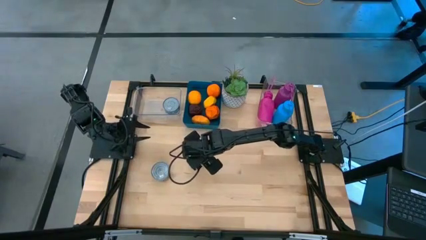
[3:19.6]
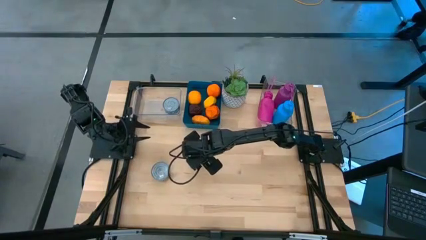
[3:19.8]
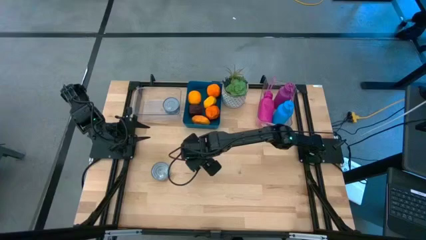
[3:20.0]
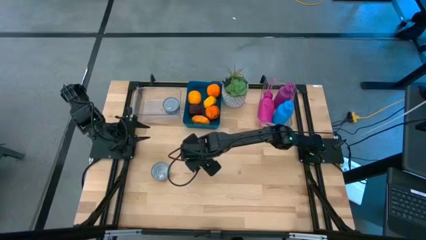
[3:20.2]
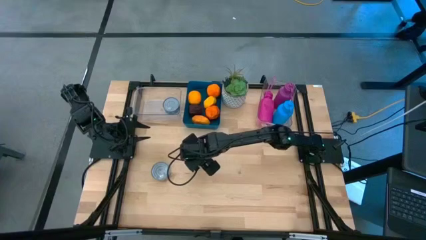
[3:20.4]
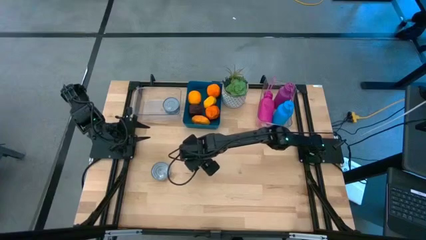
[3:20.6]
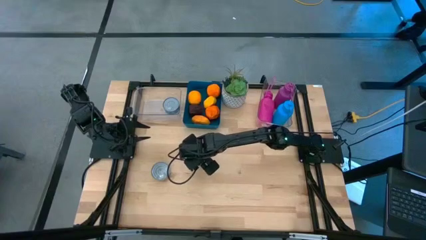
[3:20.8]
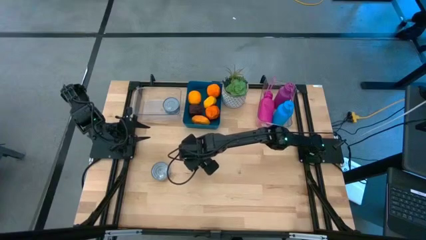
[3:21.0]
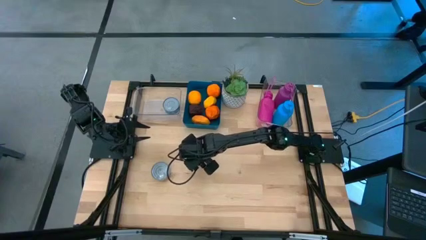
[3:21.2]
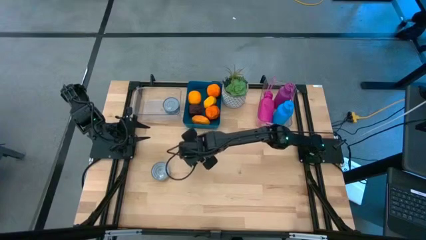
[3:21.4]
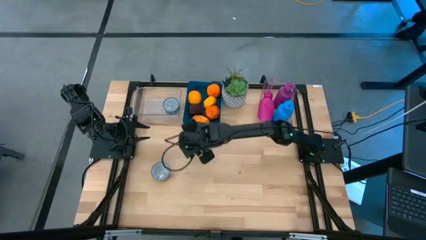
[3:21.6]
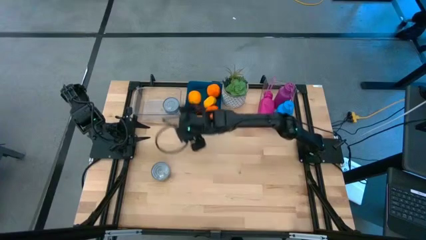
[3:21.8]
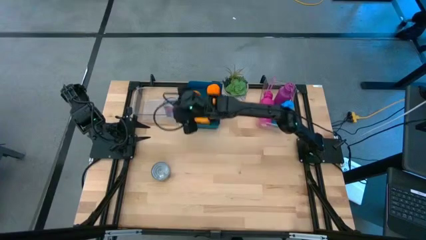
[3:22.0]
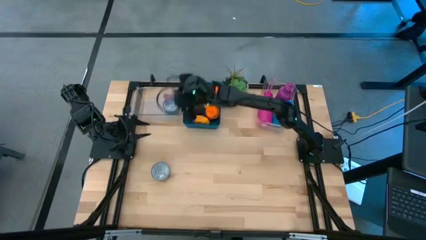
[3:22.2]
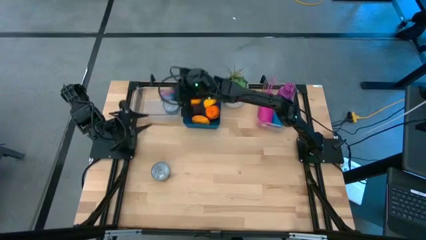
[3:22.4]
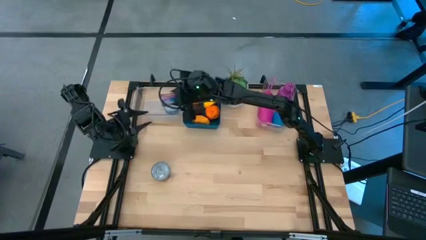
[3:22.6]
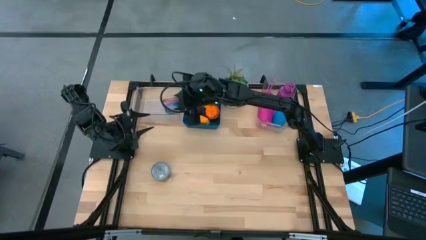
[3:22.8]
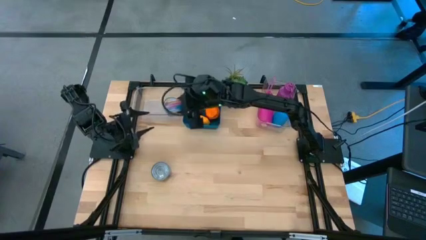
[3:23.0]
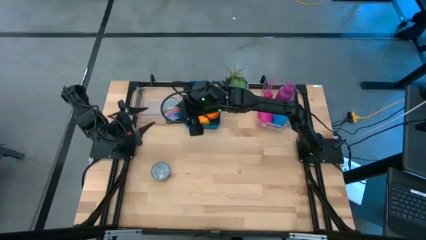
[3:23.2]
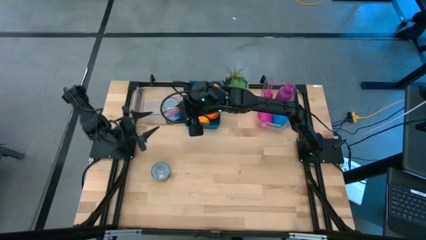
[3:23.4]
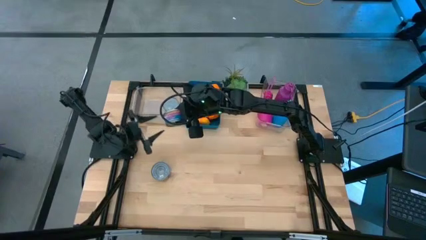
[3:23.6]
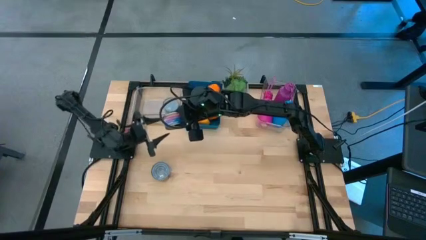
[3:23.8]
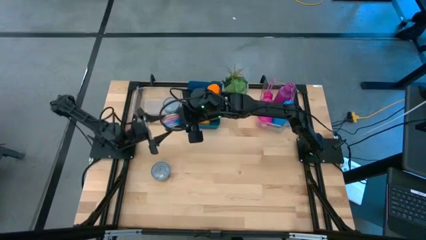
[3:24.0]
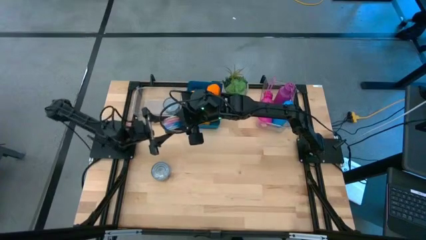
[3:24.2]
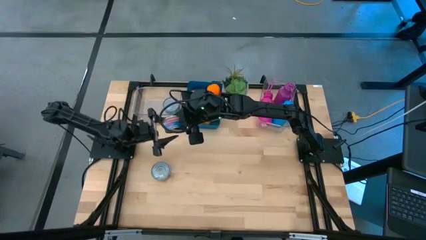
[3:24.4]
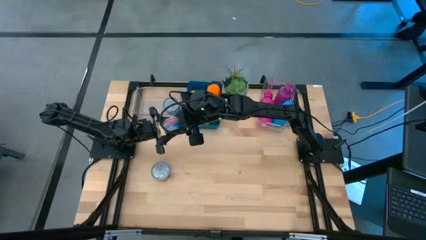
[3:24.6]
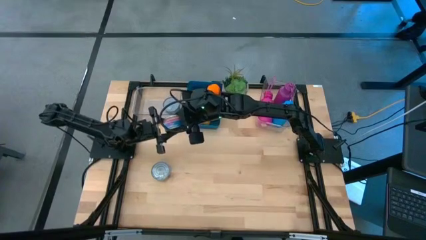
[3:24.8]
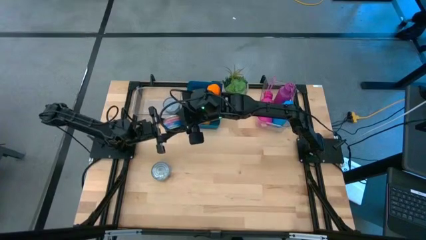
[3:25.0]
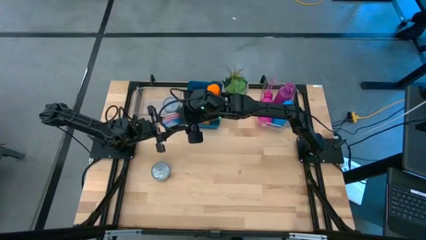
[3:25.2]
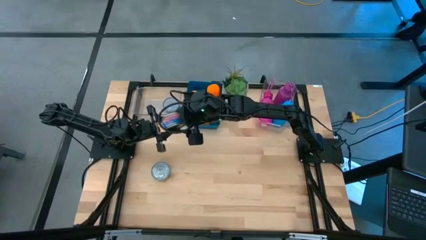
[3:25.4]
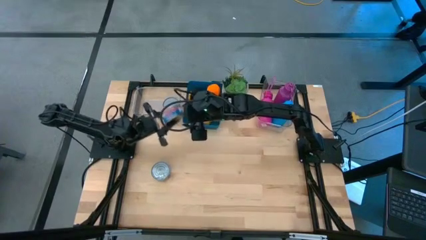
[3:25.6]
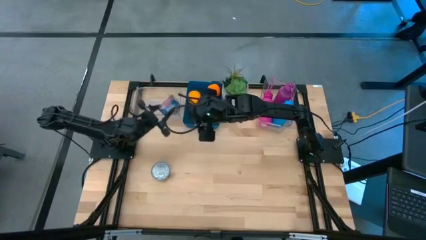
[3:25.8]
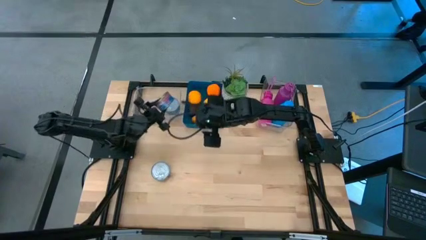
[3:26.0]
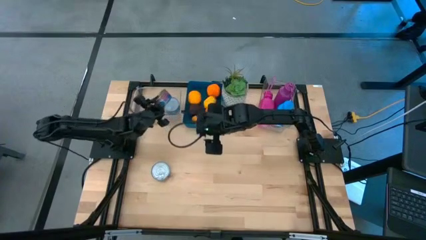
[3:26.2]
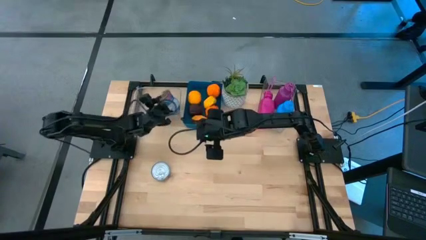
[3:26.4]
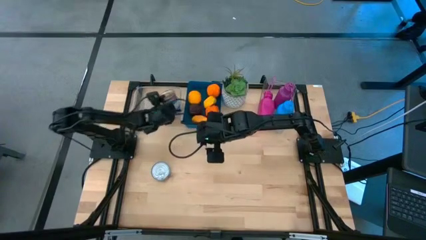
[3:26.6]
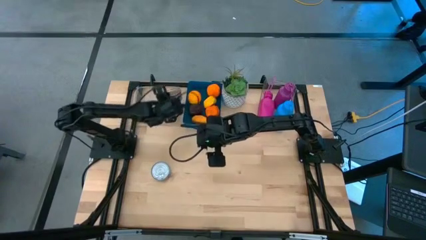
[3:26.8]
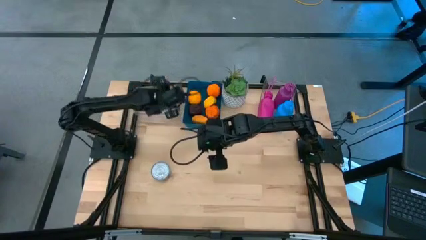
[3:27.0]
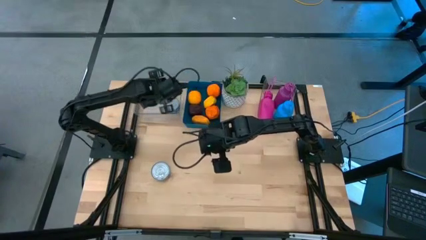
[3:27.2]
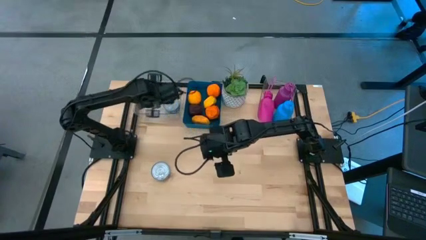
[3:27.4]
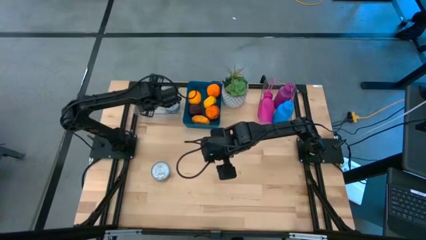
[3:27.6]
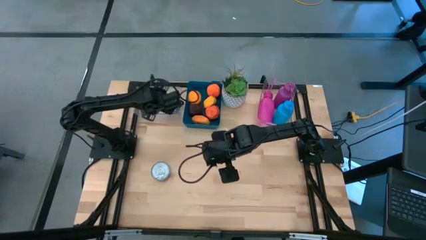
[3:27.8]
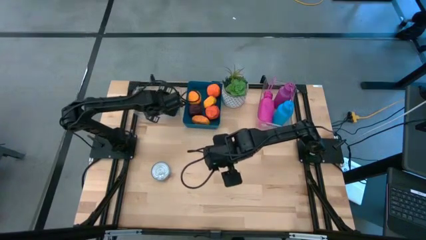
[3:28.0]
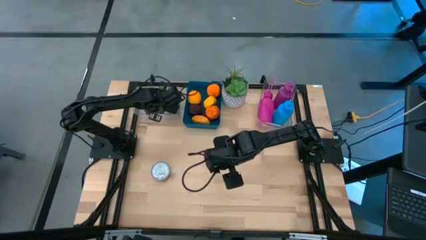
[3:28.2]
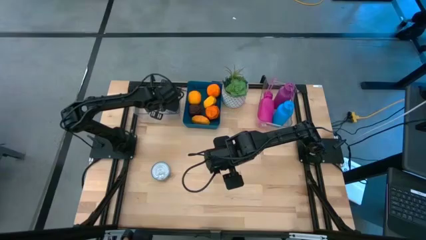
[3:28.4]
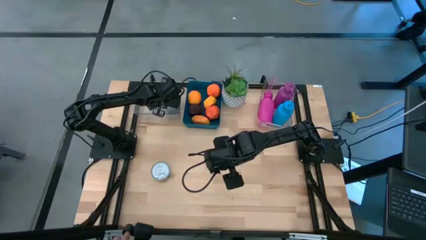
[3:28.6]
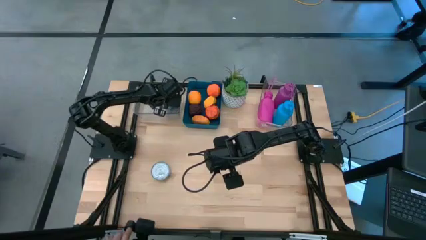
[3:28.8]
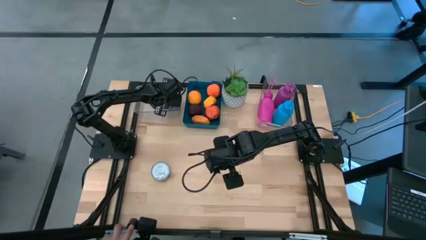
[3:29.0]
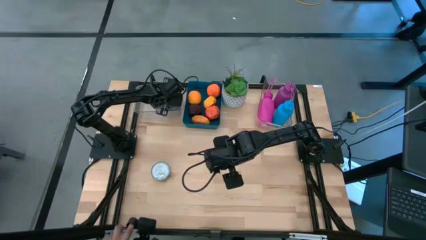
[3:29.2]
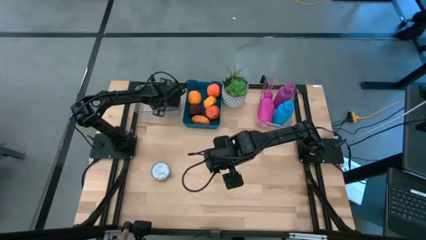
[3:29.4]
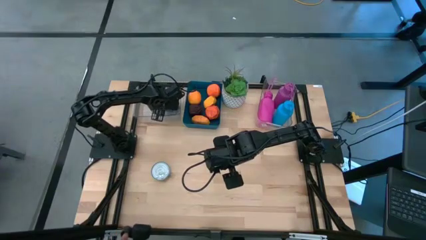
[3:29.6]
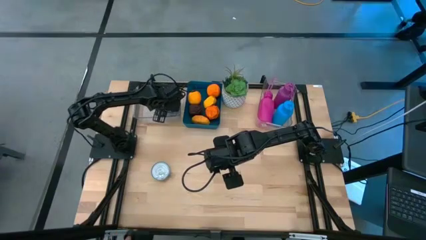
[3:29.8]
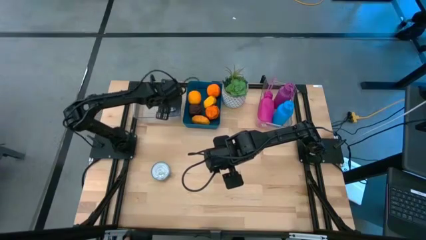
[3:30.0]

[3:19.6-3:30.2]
Task: Pick & Place Food Item
Stack the blue and pink tuna can on top of the blue tuna can into the left transparent bin

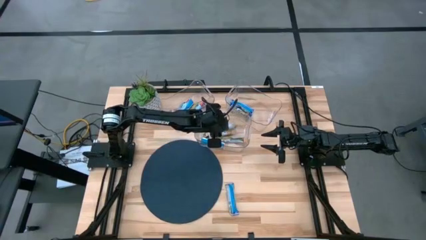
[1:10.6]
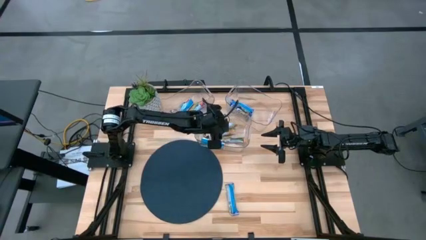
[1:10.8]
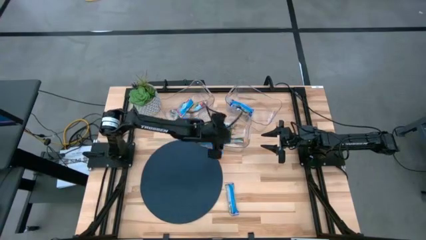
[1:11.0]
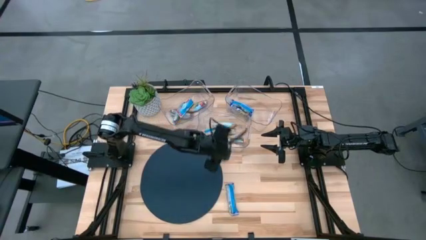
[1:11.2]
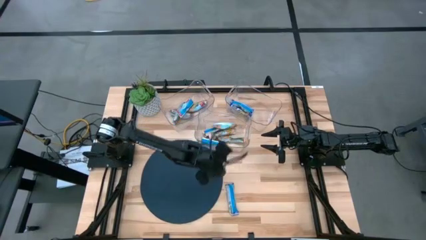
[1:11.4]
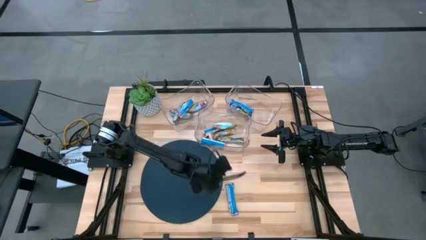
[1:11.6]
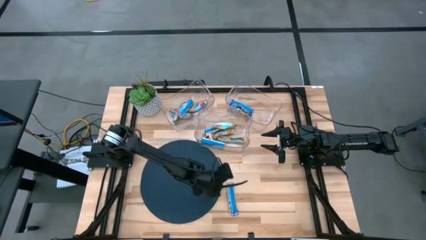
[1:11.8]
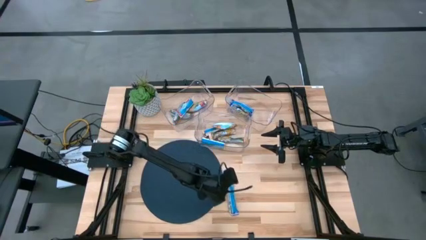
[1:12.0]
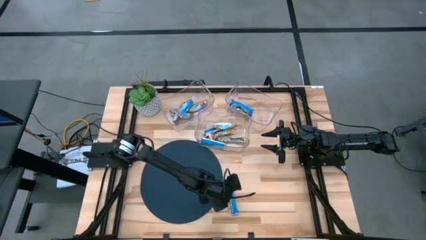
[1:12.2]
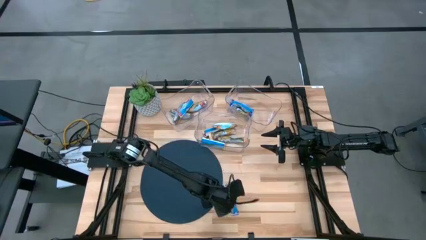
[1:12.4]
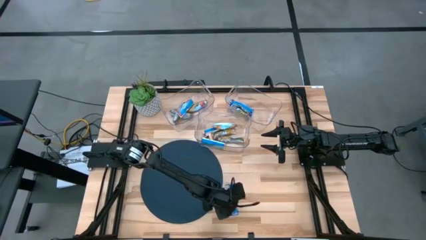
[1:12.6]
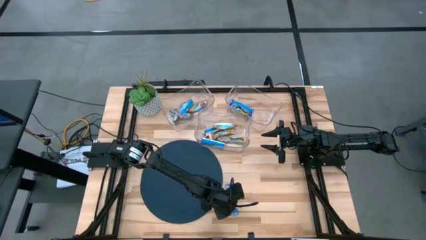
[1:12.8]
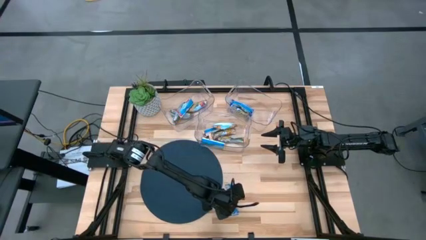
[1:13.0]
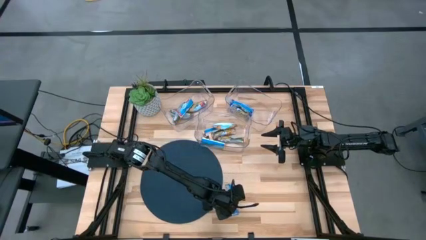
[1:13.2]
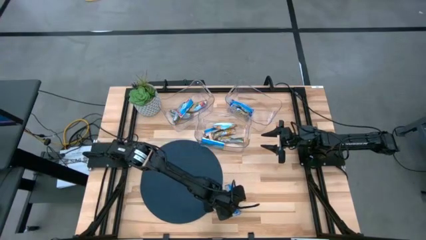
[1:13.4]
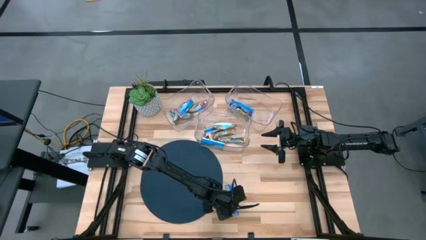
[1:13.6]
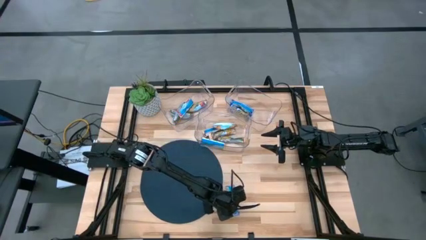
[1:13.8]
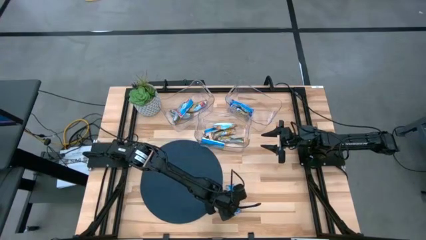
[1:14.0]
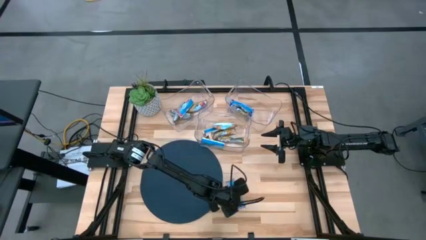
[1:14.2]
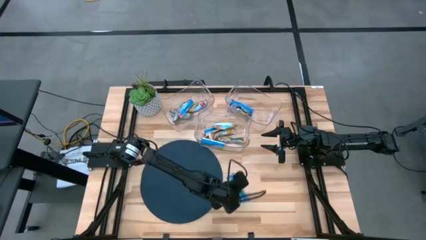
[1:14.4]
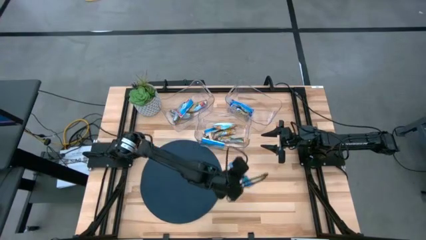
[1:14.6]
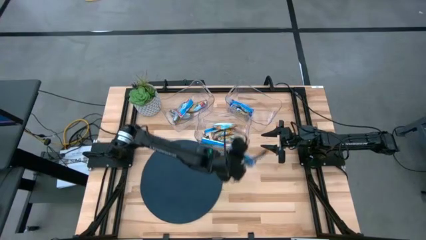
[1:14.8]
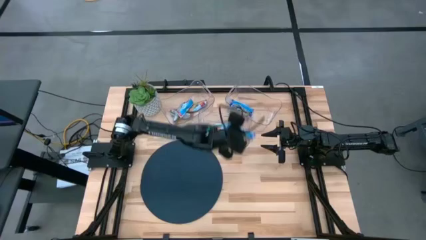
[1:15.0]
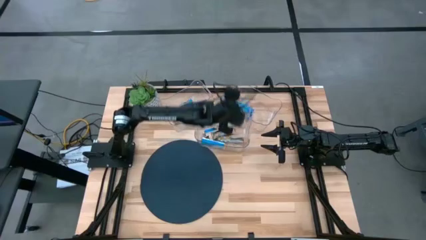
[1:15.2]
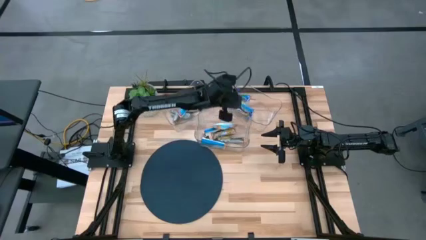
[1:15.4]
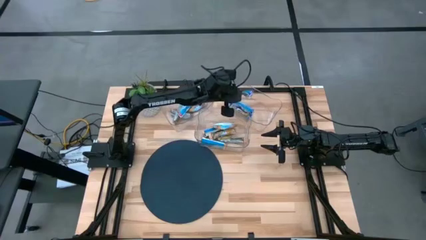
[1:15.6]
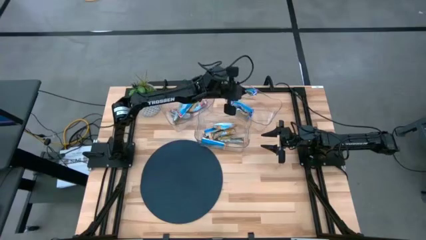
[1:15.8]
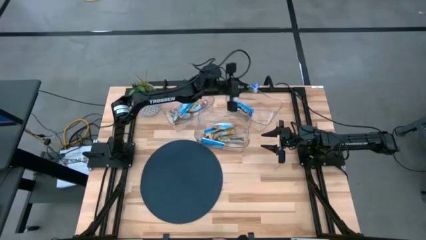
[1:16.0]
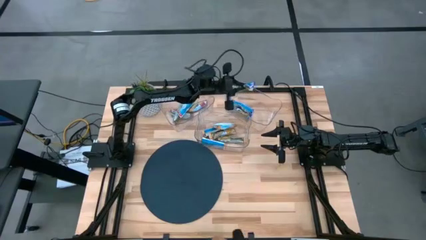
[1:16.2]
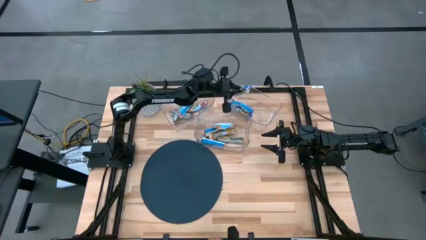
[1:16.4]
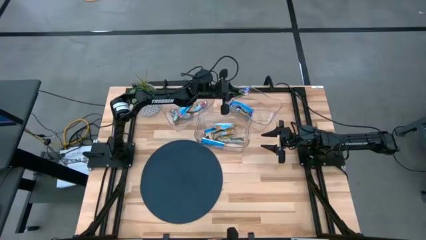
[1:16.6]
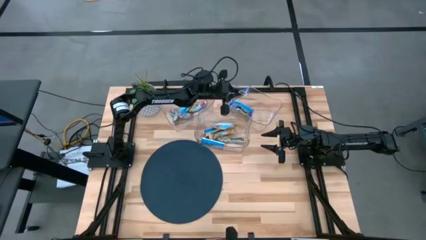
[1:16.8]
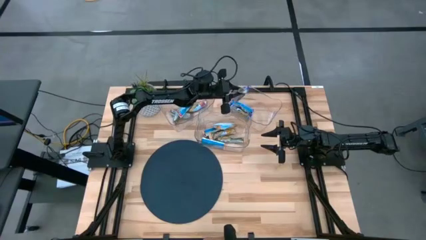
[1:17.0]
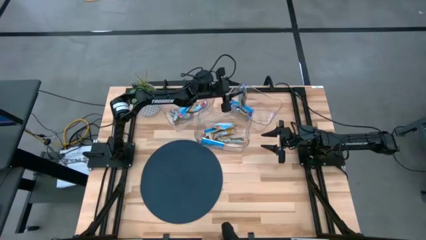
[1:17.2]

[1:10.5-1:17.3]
Task: Pick and place Granola Bars by type
Put the blue granola bar into the right transparent bin
